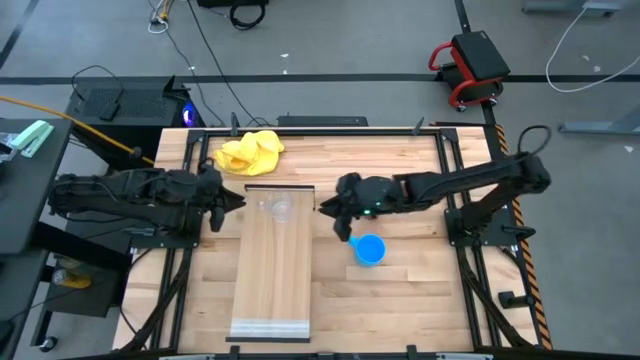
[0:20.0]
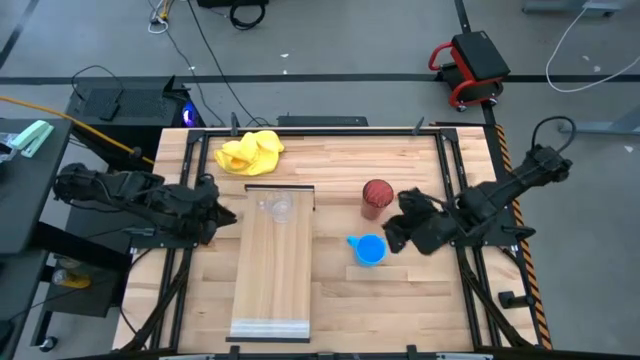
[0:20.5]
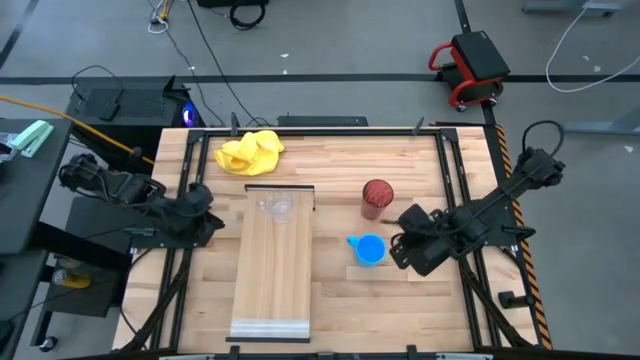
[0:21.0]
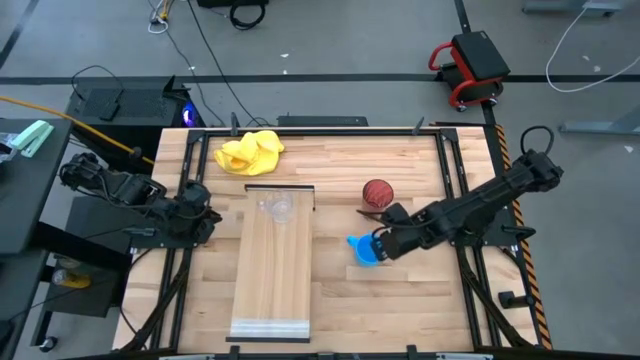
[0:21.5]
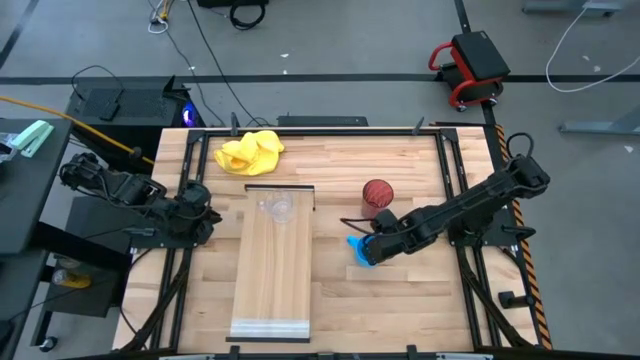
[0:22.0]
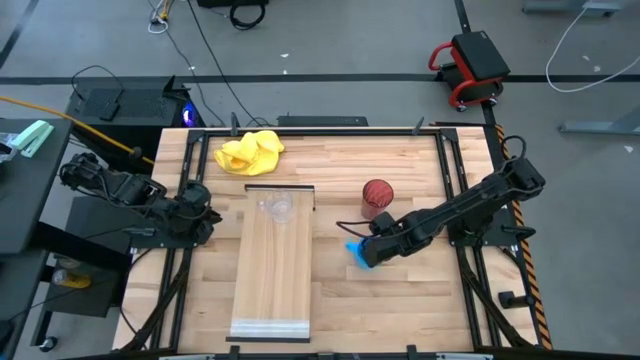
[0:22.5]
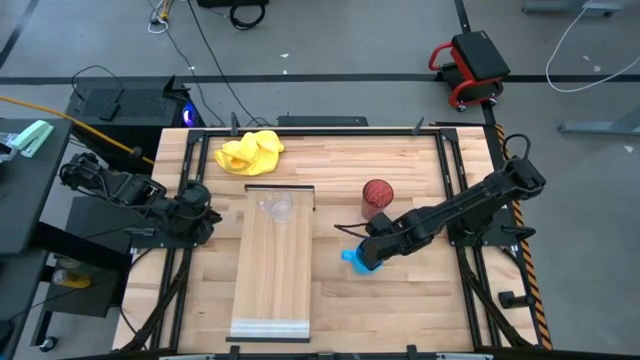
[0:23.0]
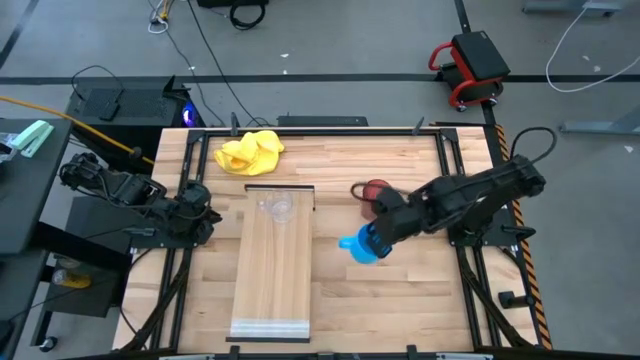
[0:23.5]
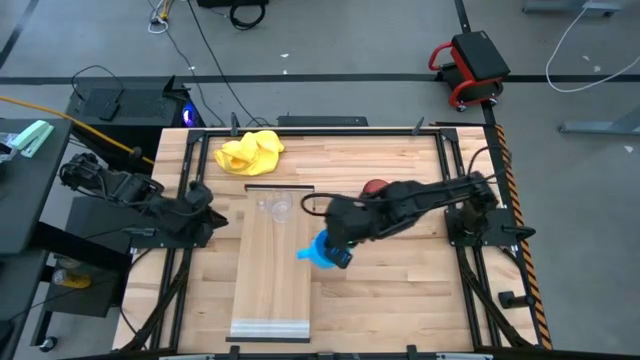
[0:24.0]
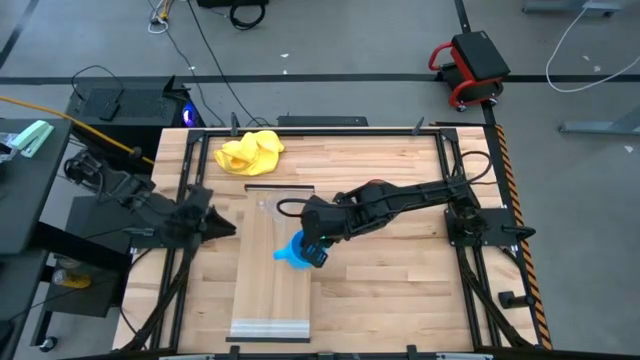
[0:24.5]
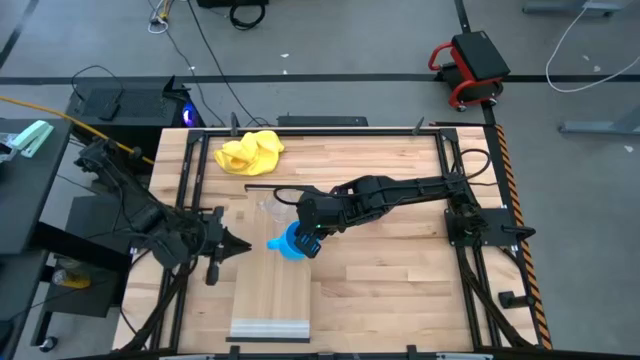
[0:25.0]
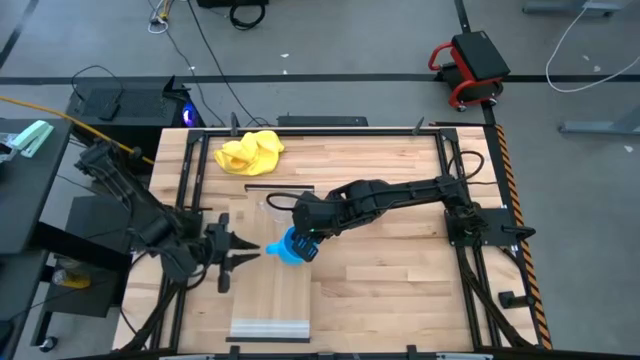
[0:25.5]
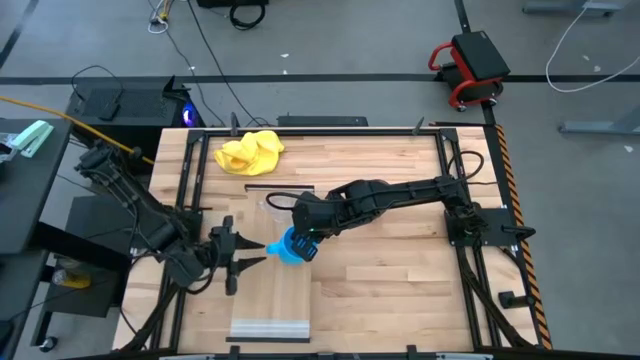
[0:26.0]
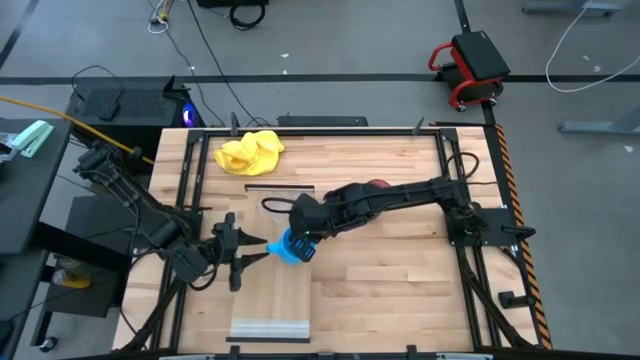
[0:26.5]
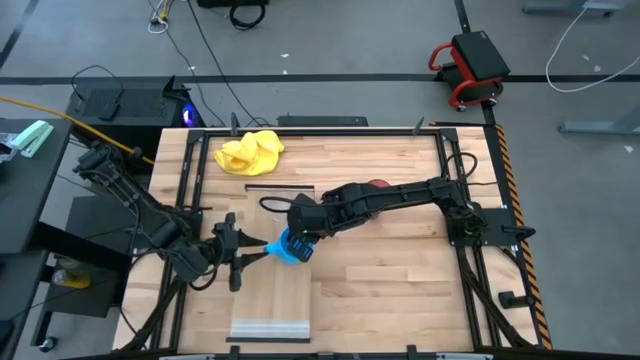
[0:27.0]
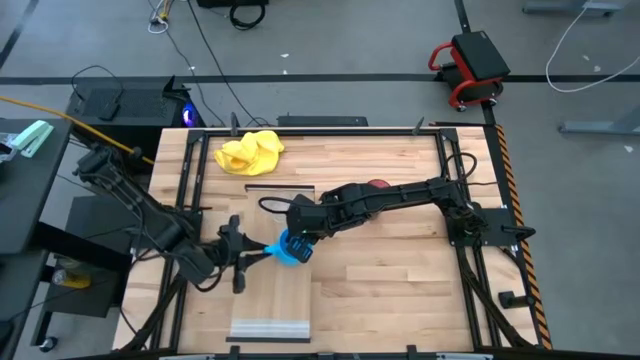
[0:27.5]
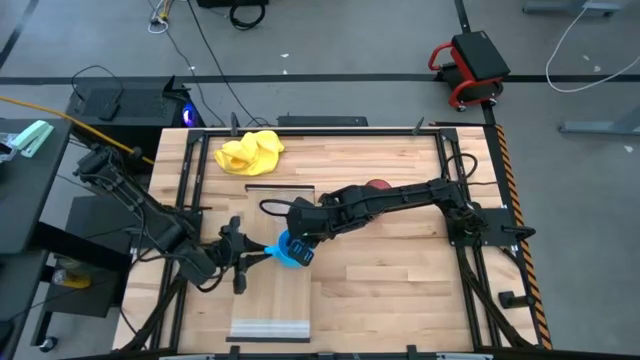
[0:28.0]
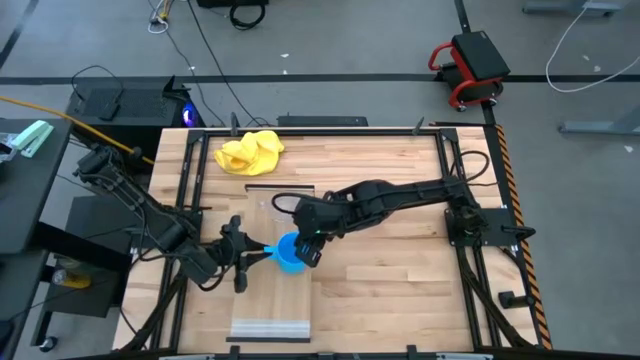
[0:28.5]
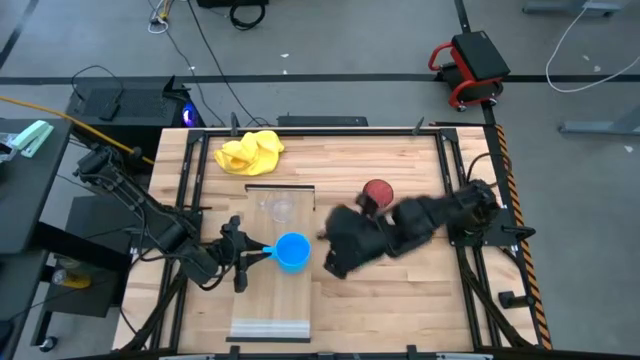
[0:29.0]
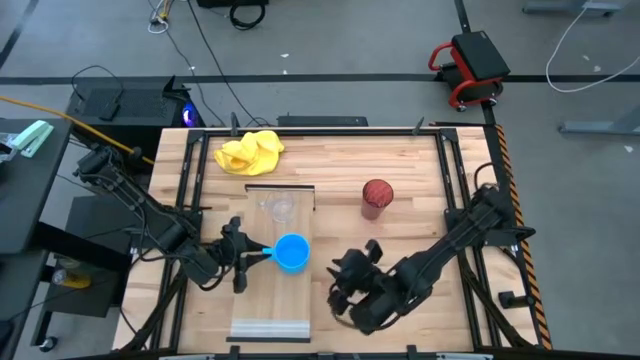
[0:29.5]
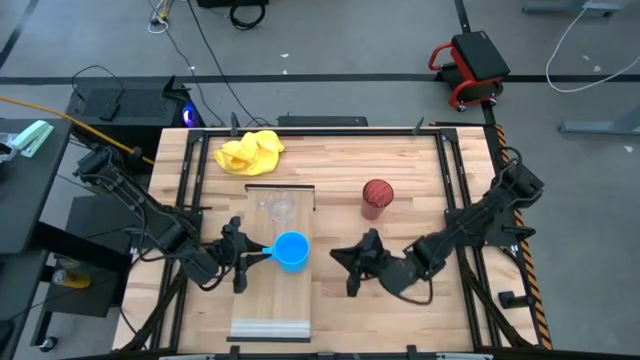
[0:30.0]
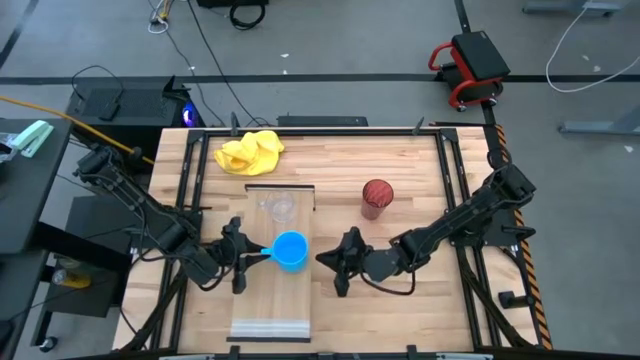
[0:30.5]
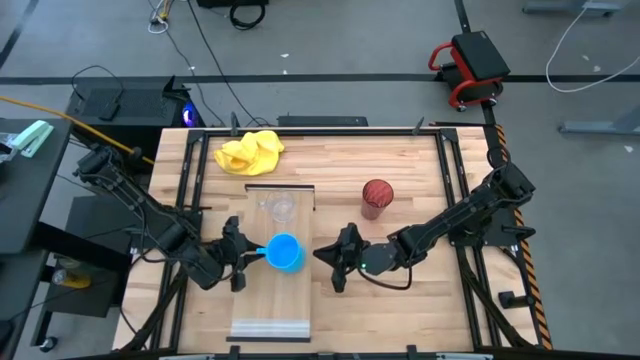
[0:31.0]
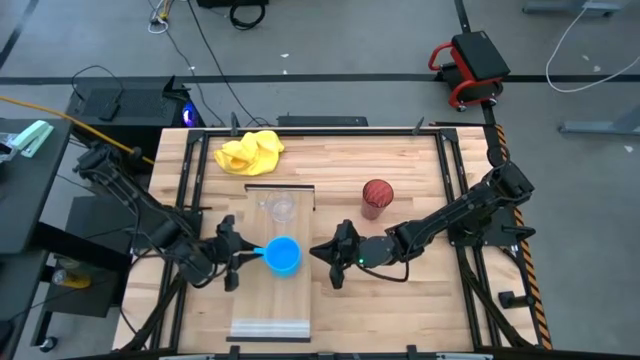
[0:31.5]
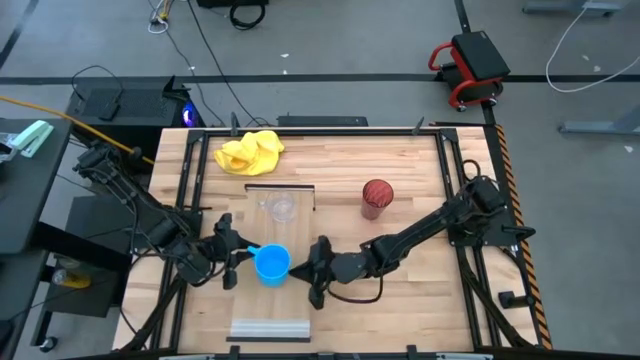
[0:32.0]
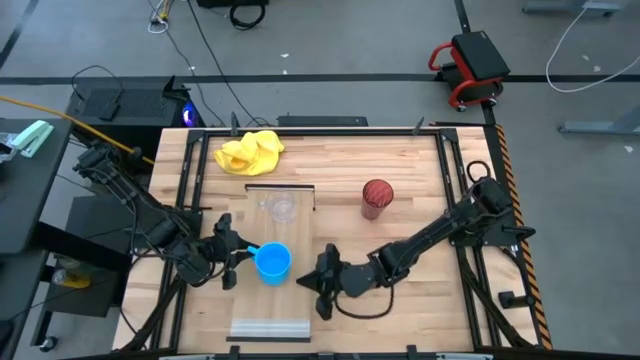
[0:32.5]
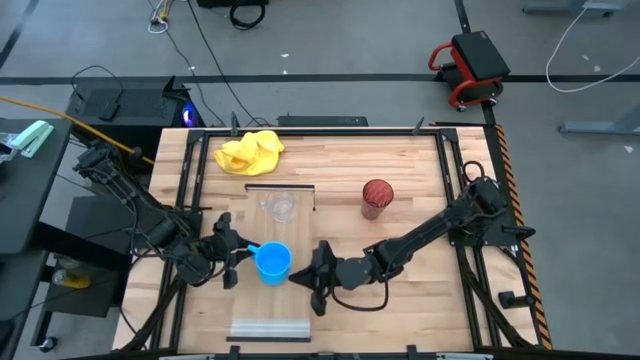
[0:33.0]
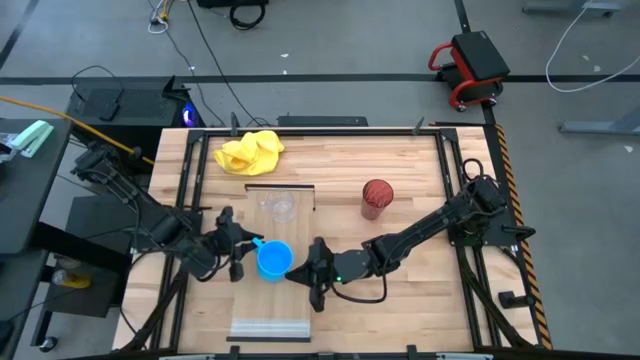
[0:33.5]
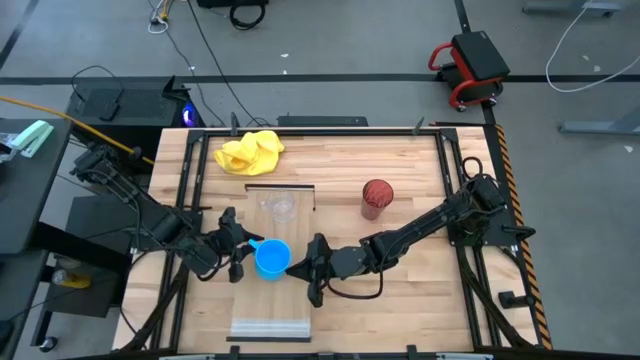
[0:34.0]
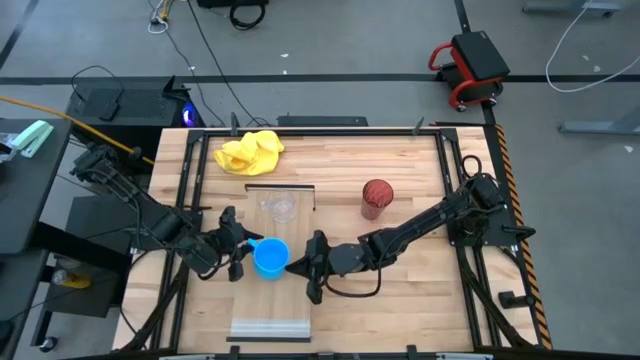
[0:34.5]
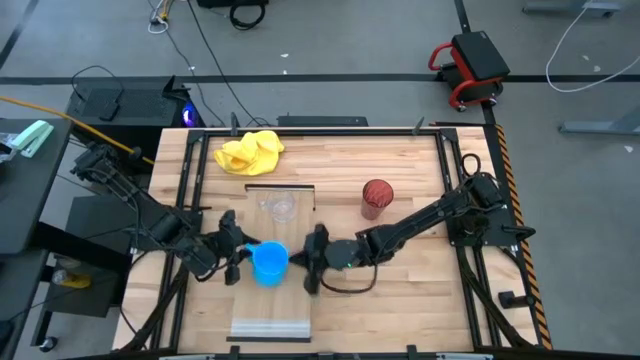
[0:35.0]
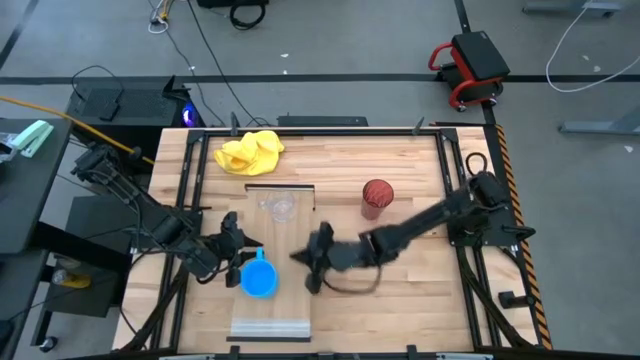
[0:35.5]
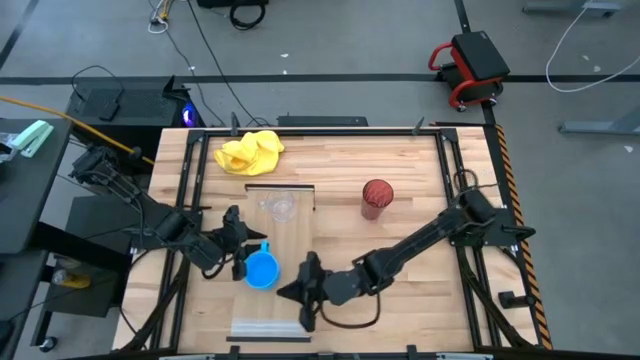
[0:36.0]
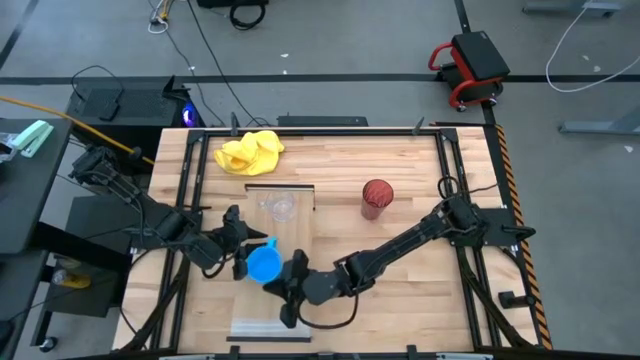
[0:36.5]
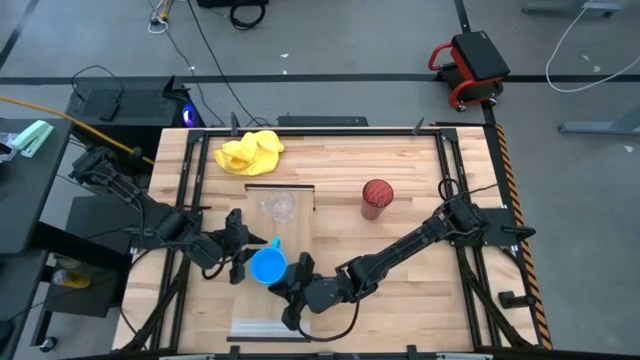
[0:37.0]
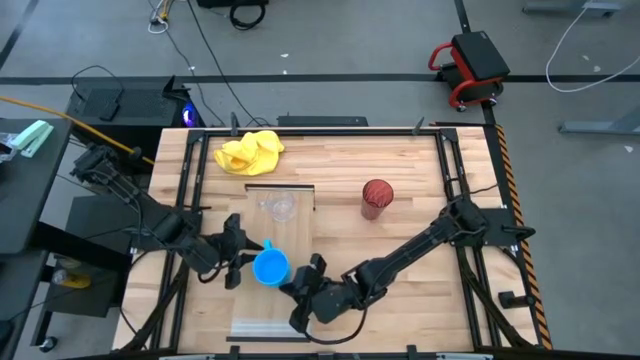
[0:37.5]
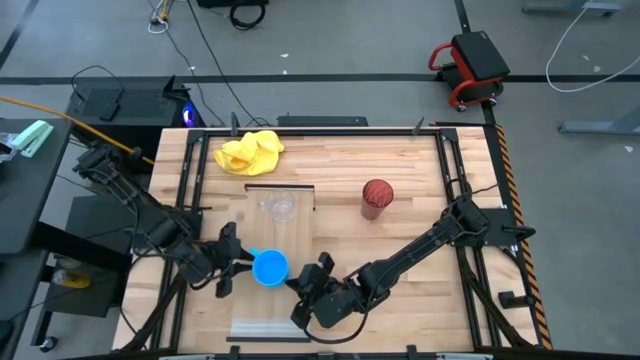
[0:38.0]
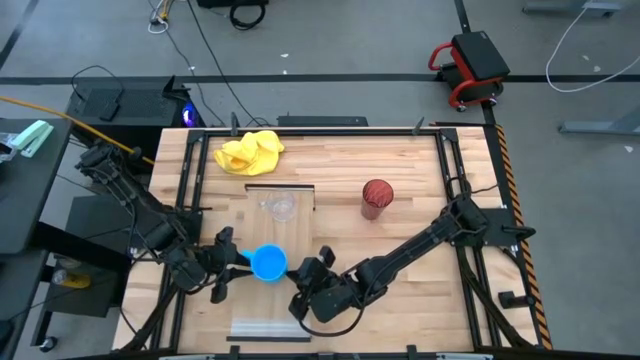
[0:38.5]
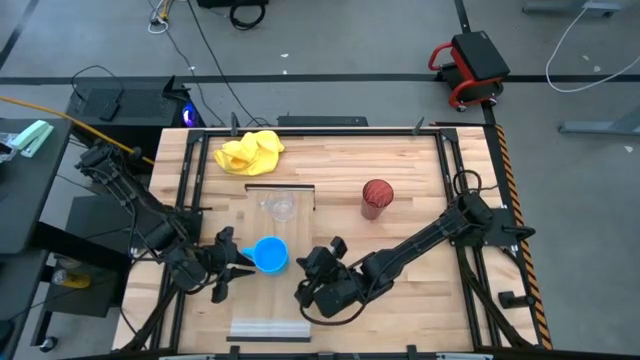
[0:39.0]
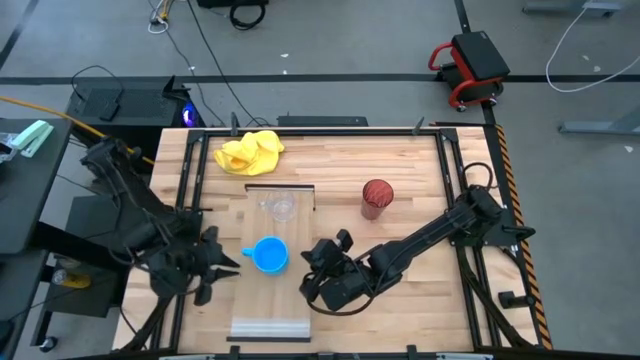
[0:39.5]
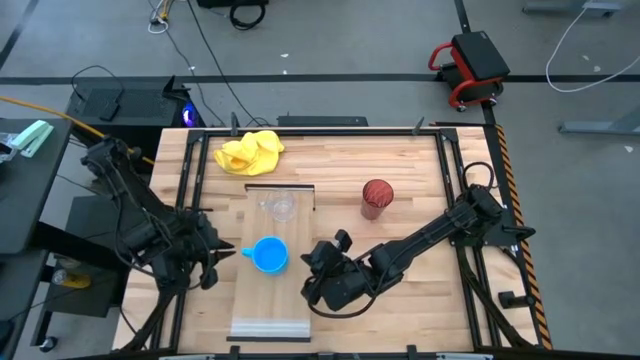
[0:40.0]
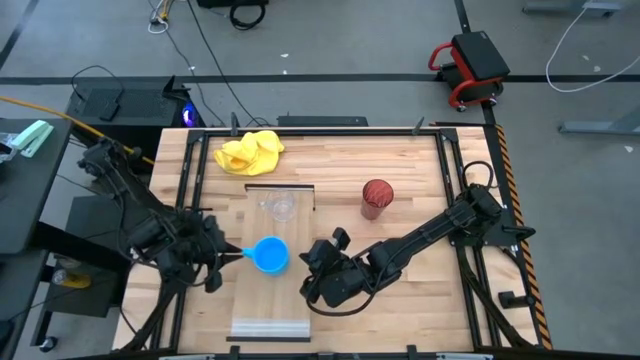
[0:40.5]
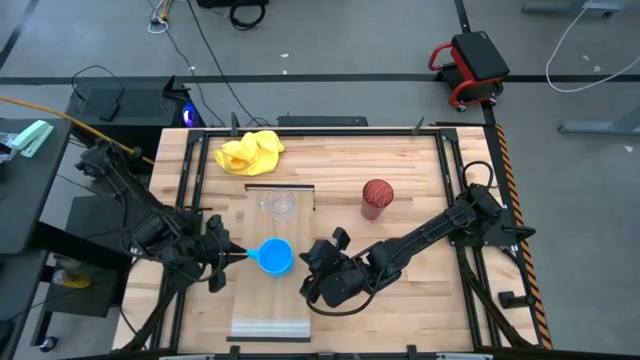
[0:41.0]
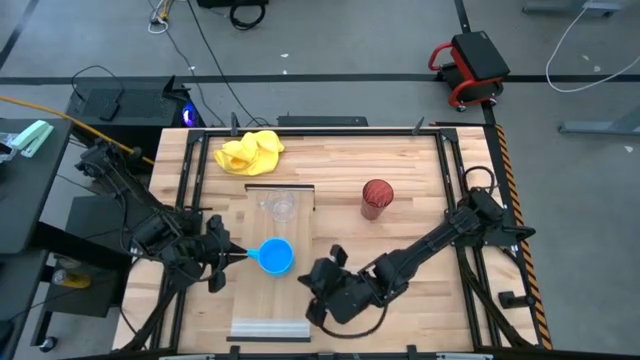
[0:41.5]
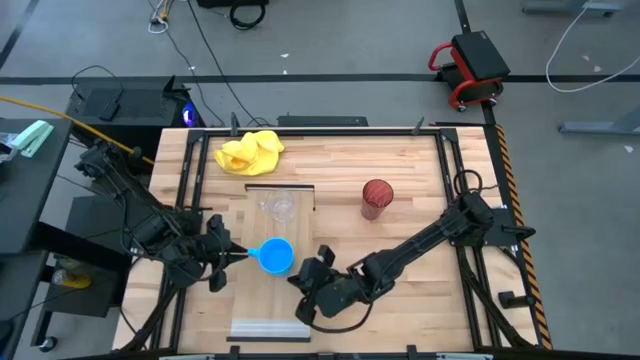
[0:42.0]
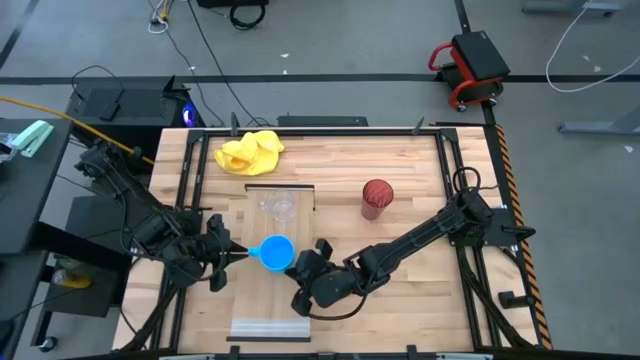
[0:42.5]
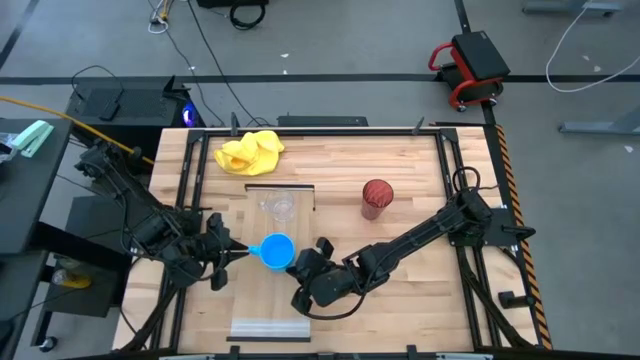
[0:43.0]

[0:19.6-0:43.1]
Task: Stack small to large cups/mugs on shelf
Put the blue mug on the shelf
